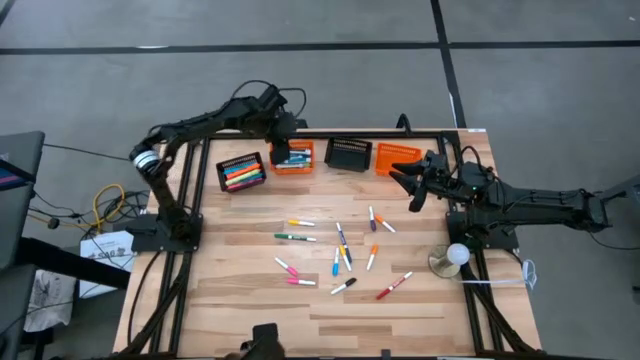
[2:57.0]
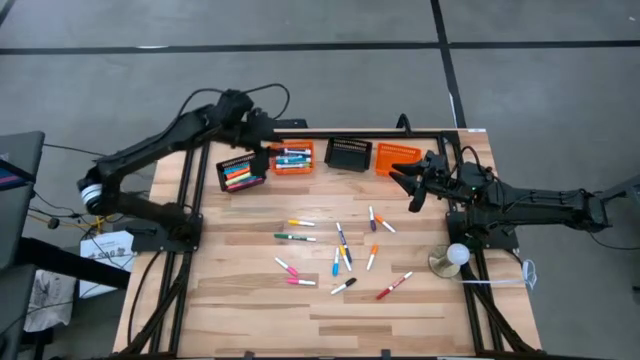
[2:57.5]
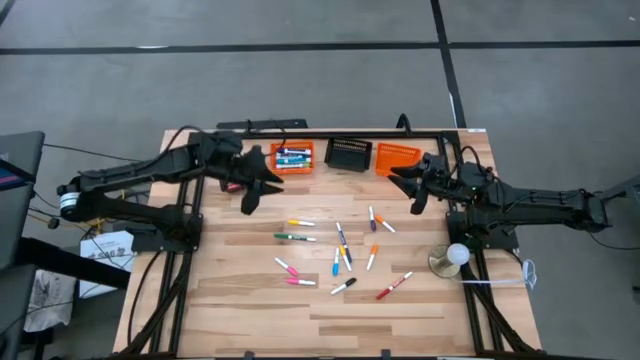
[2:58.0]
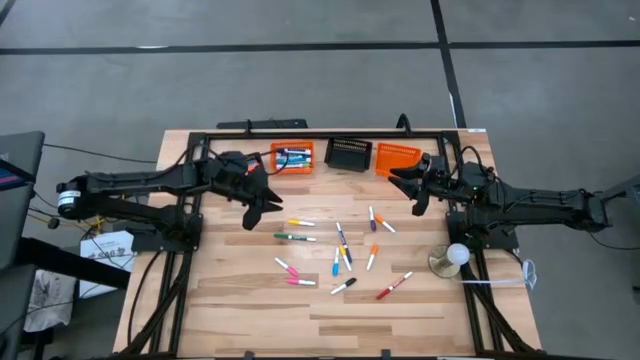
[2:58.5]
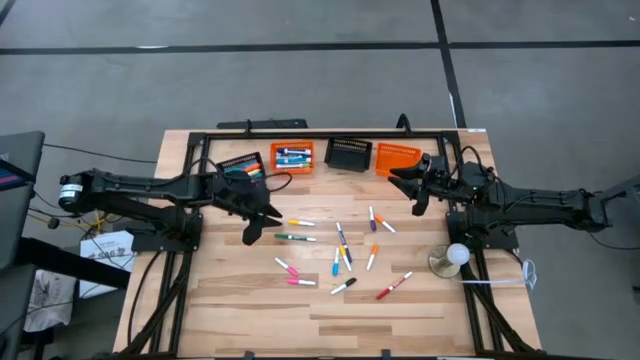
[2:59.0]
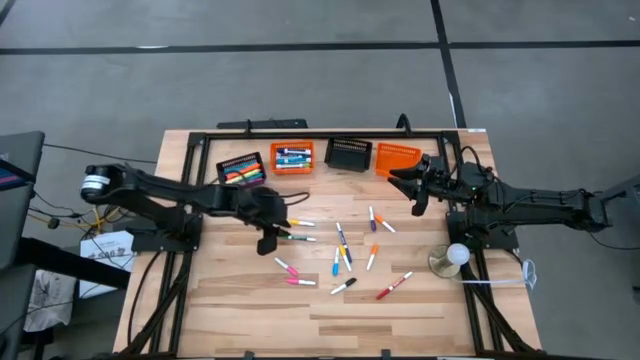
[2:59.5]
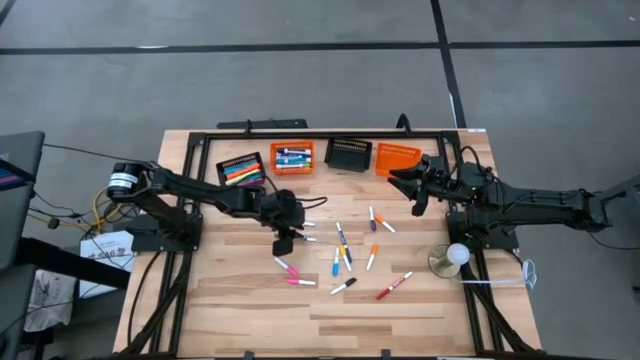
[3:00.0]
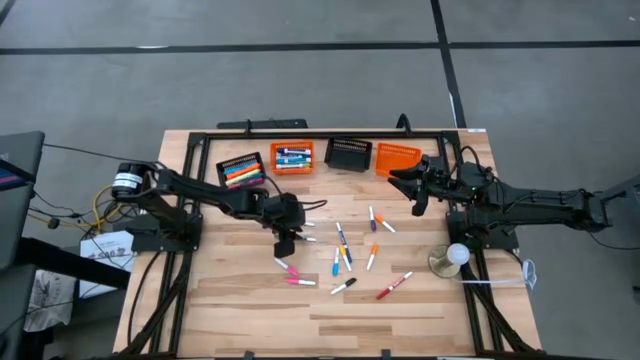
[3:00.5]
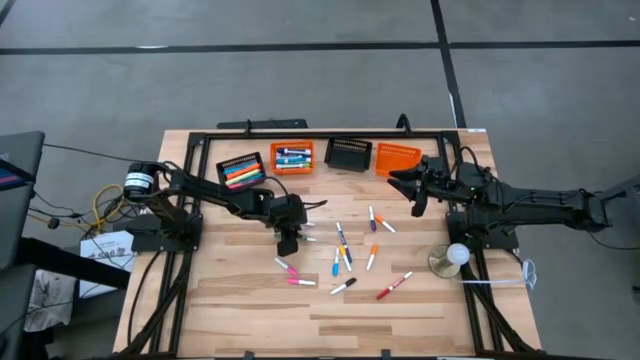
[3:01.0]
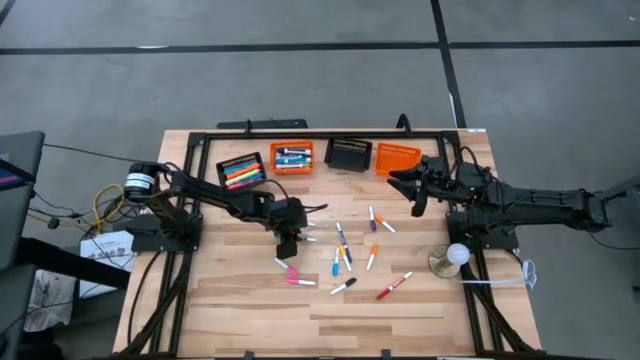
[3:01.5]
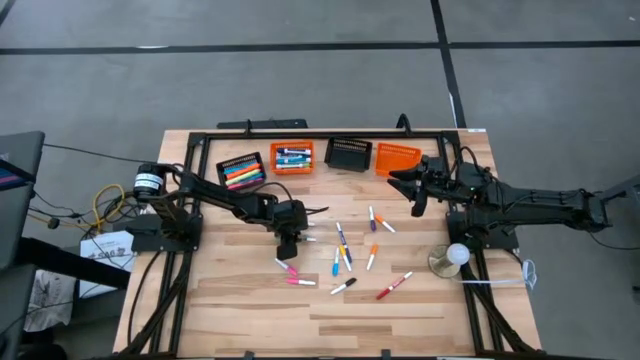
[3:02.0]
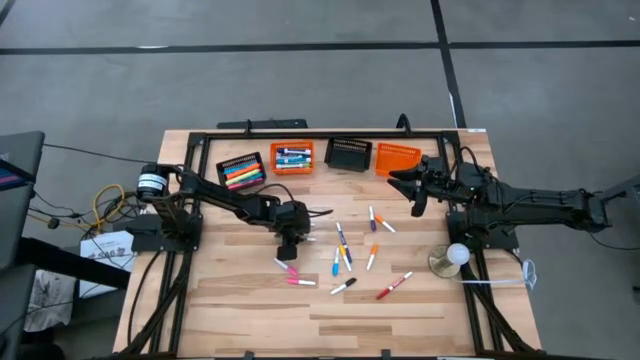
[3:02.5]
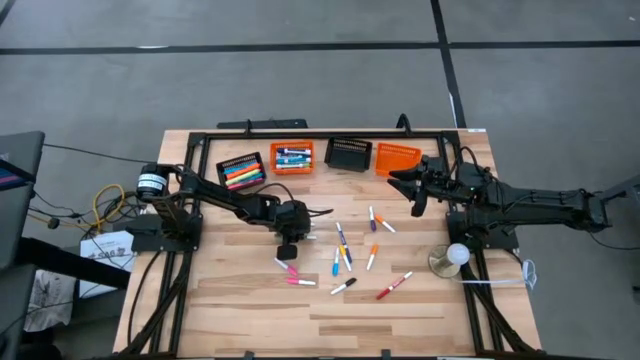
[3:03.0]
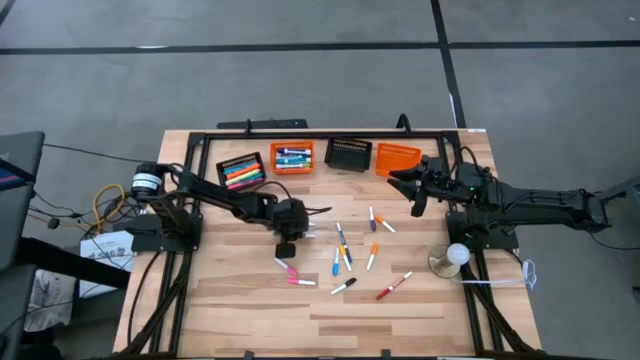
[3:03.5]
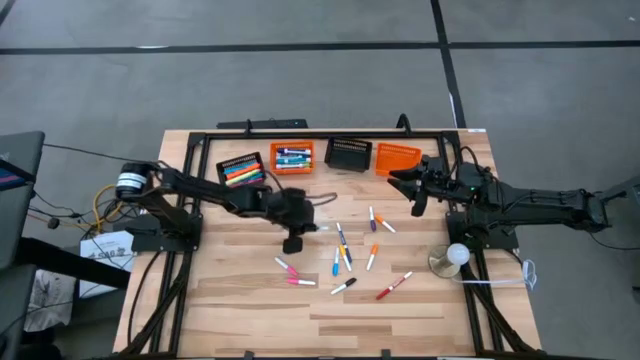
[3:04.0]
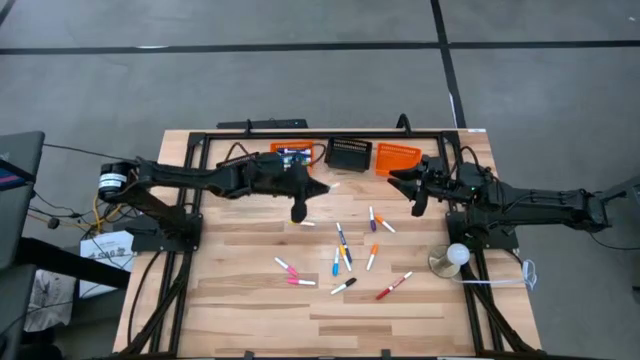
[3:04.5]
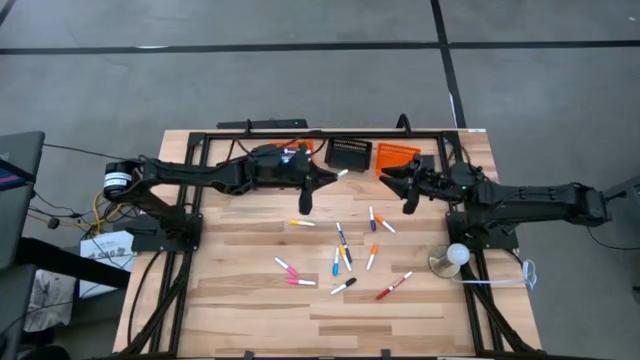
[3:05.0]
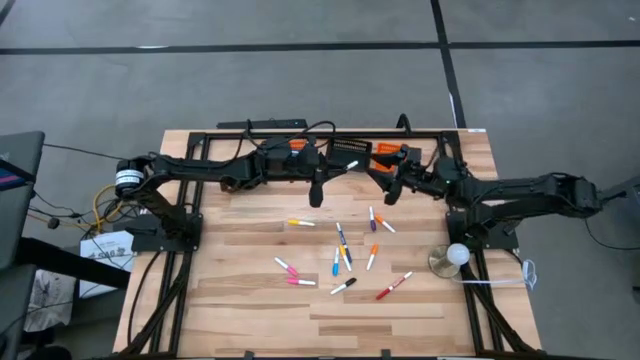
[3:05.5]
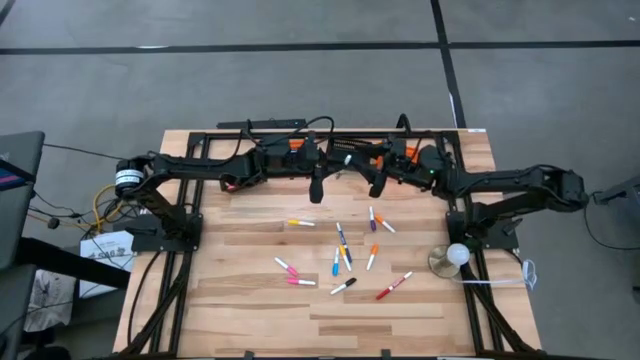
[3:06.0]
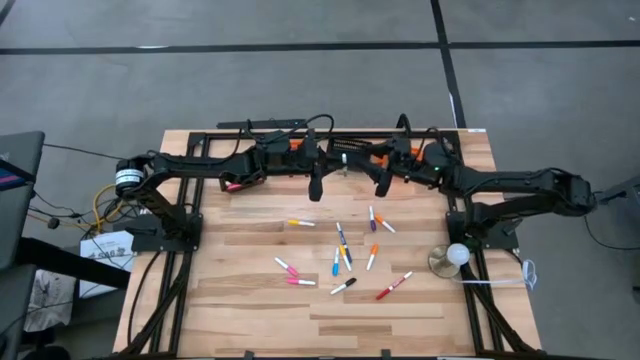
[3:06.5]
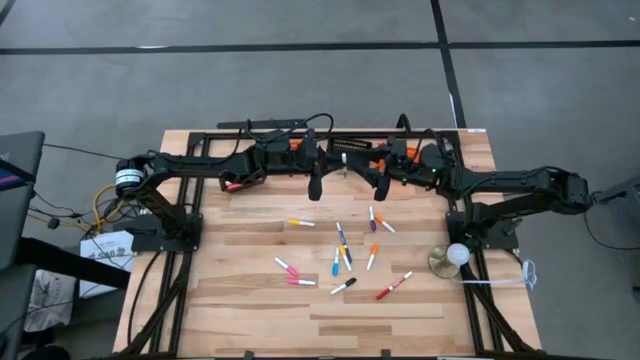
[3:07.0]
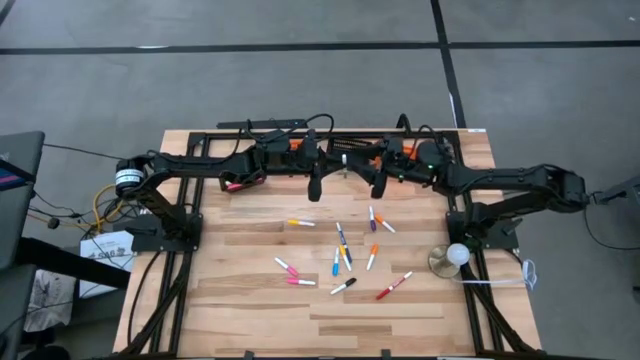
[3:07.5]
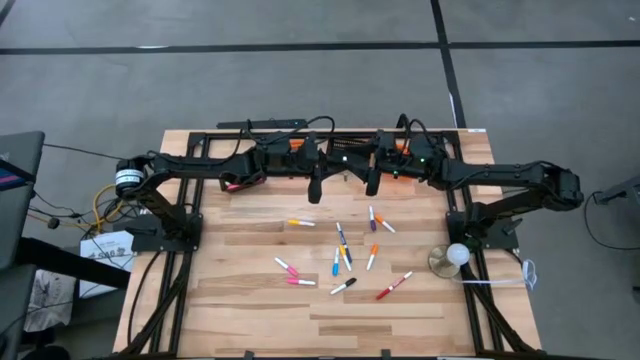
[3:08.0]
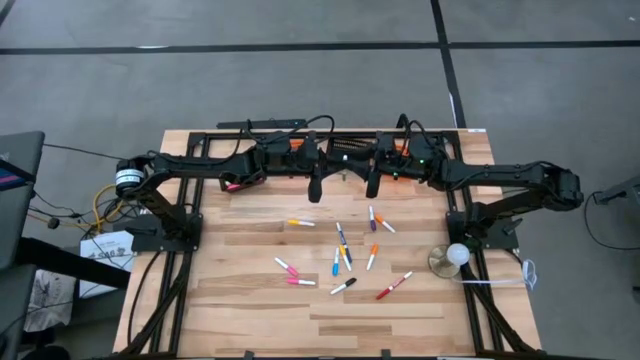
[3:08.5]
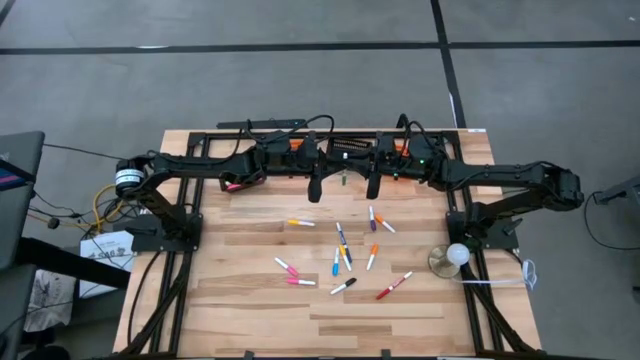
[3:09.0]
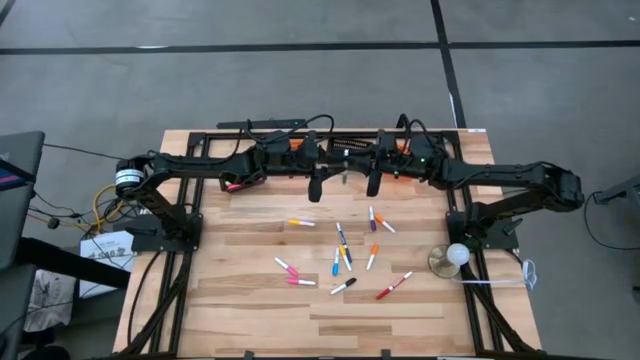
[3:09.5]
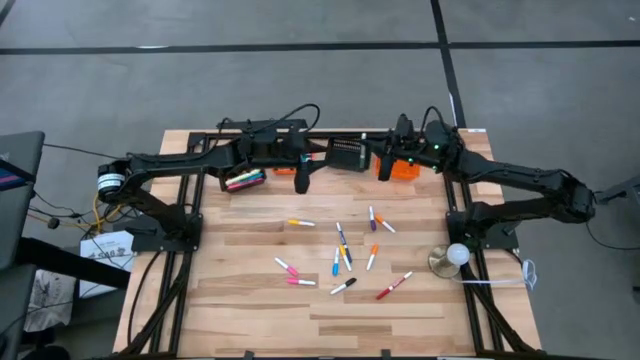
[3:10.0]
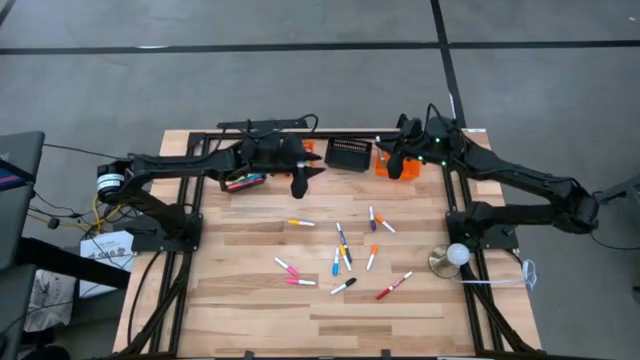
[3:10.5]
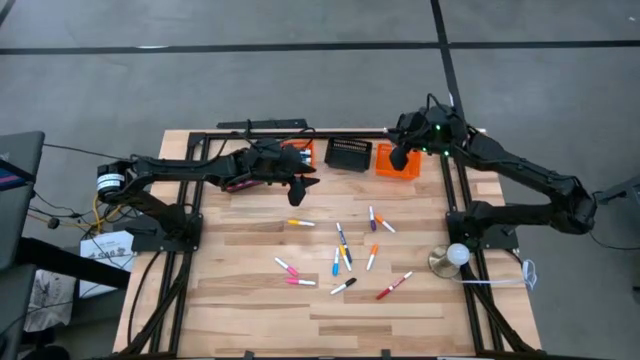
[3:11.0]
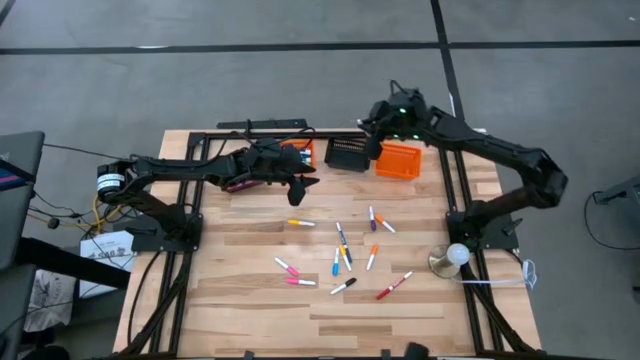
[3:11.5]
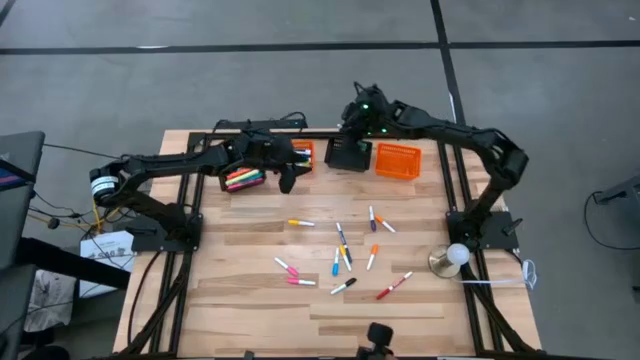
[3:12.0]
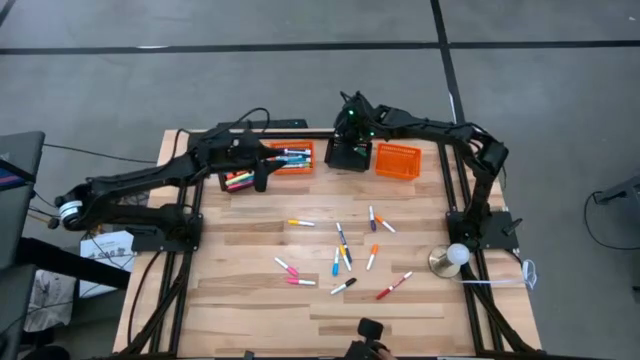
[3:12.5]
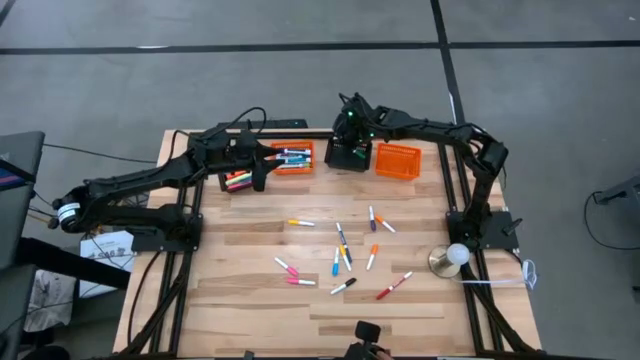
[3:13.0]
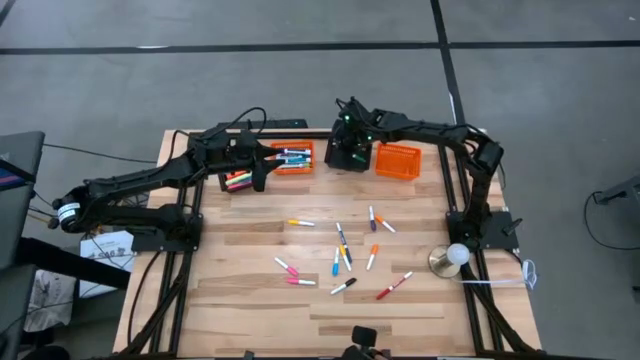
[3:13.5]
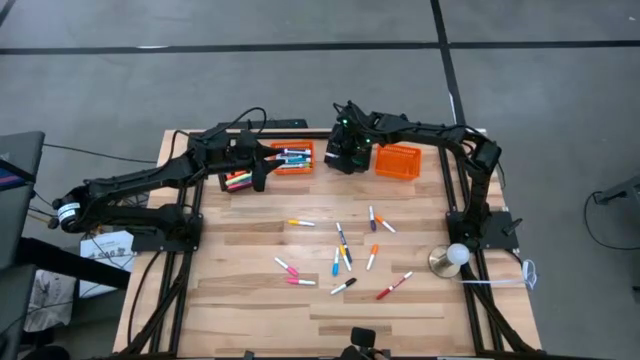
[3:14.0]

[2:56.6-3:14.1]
Task: Pick & Place Markers
Put the small green marker pen into the right black bin

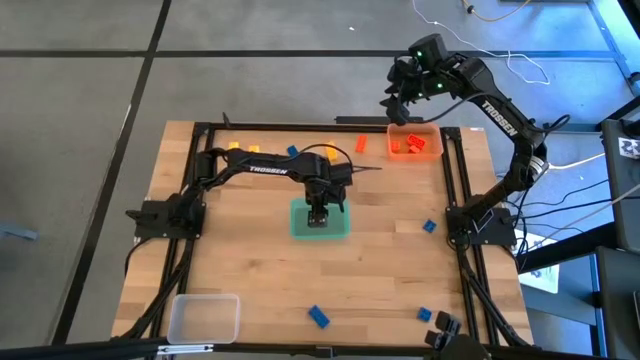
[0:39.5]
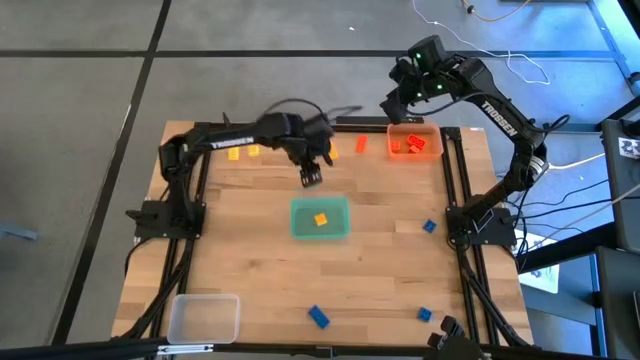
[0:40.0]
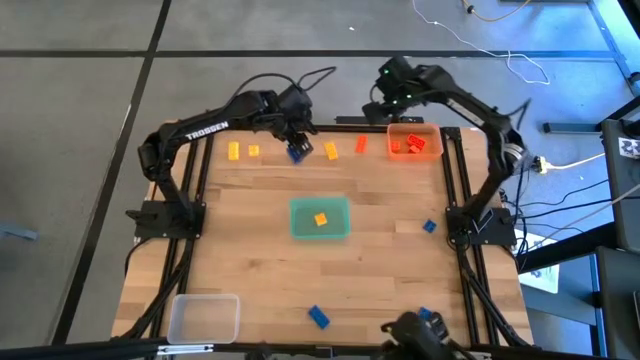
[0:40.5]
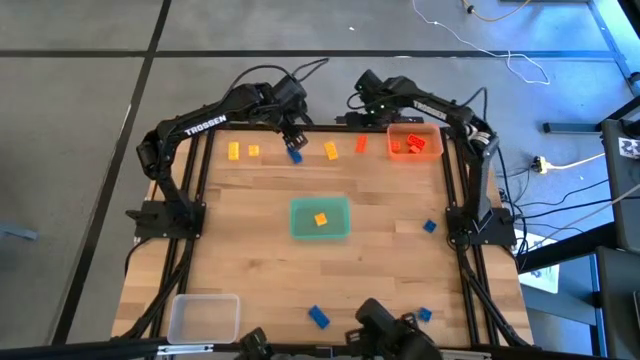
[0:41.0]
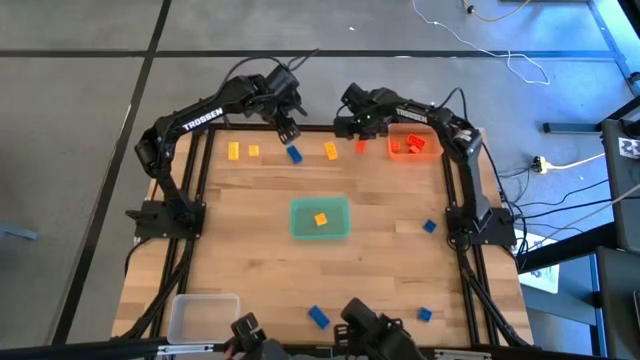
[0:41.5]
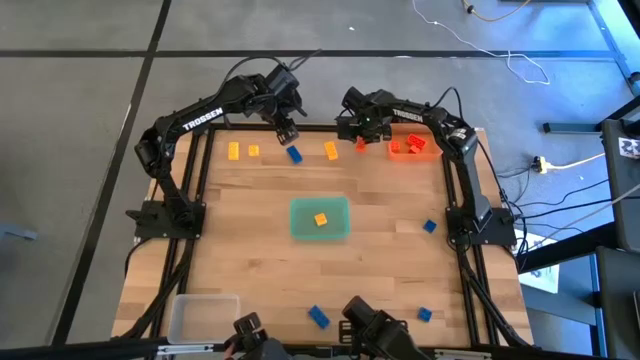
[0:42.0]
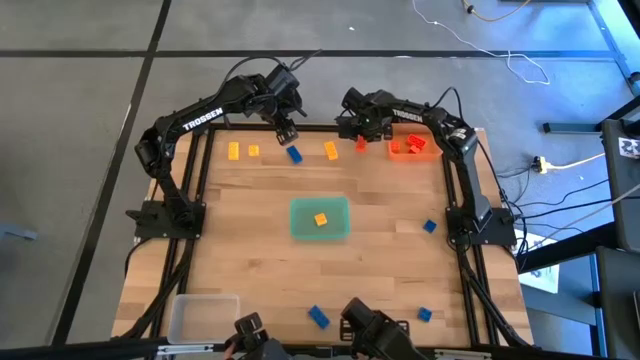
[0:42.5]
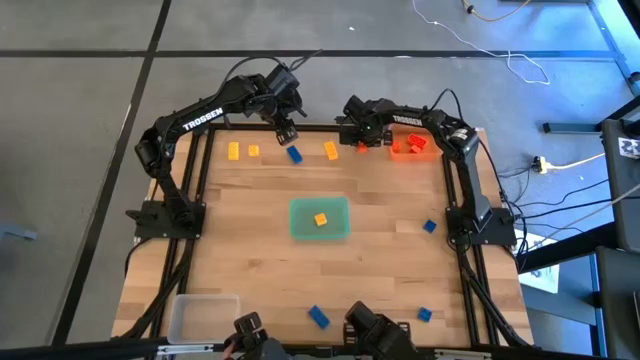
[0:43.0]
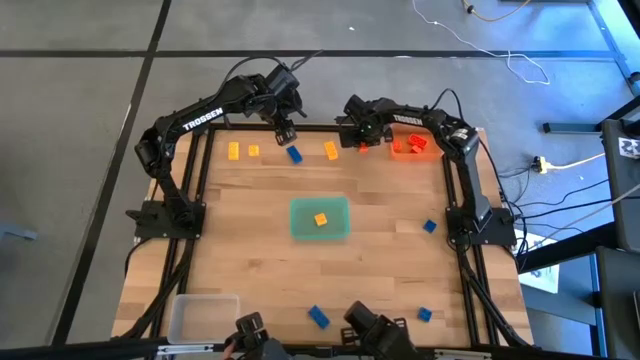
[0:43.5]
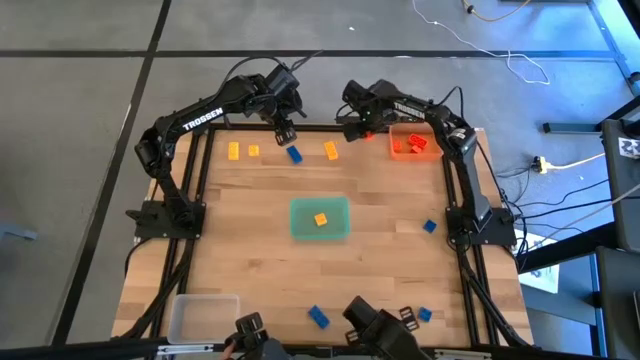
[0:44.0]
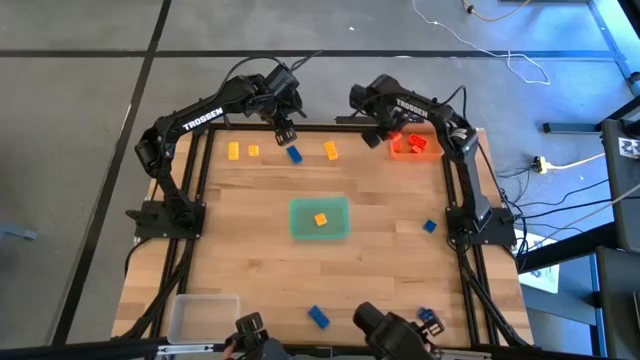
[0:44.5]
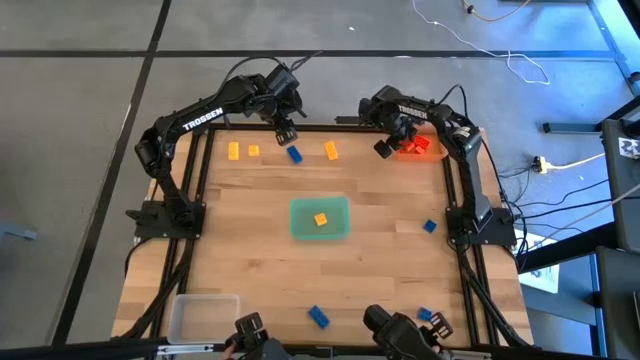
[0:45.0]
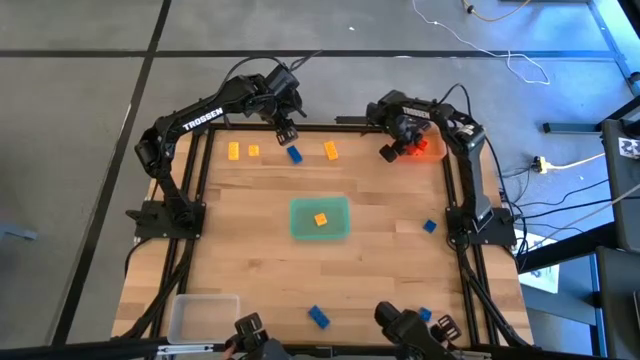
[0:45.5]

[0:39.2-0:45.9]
Task: Sort & place blocks by color
Put the orange game piece into the orange bin
